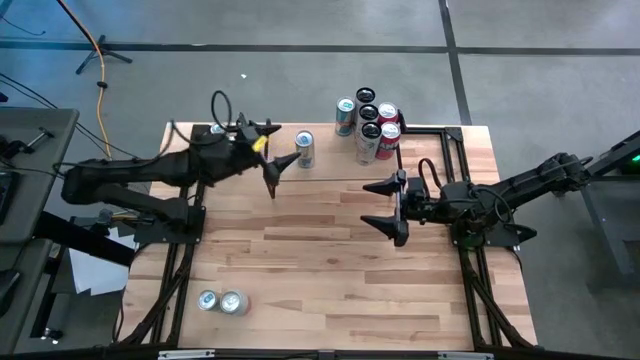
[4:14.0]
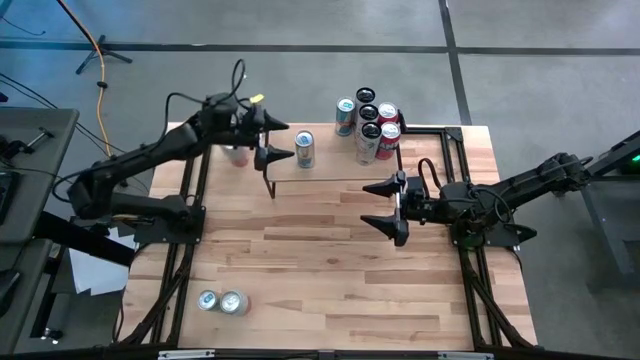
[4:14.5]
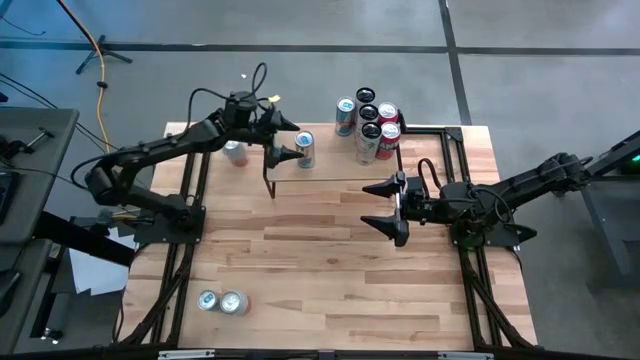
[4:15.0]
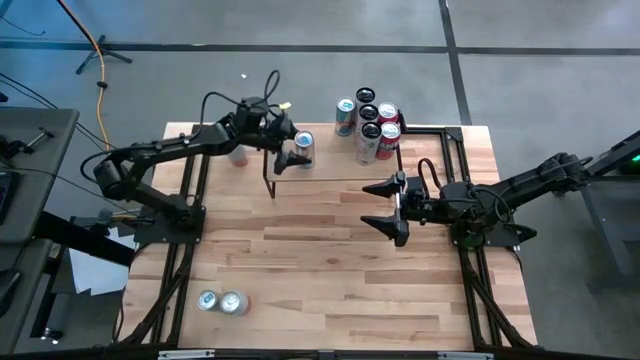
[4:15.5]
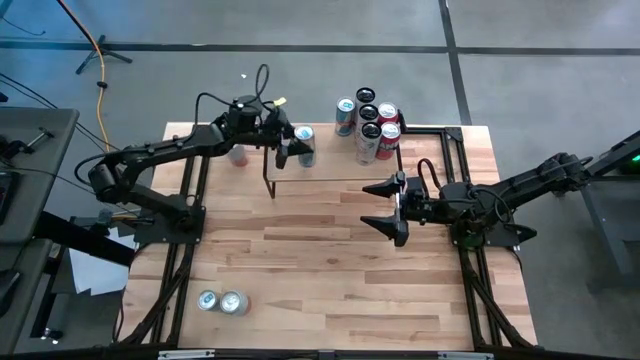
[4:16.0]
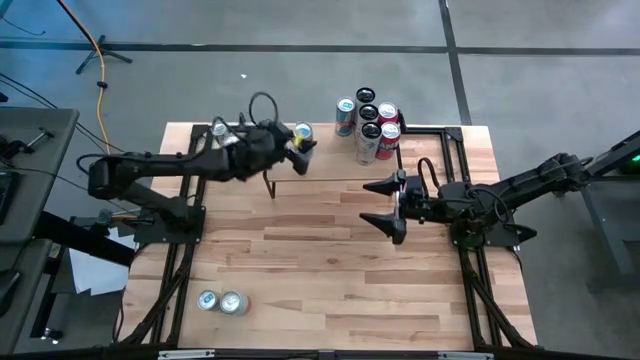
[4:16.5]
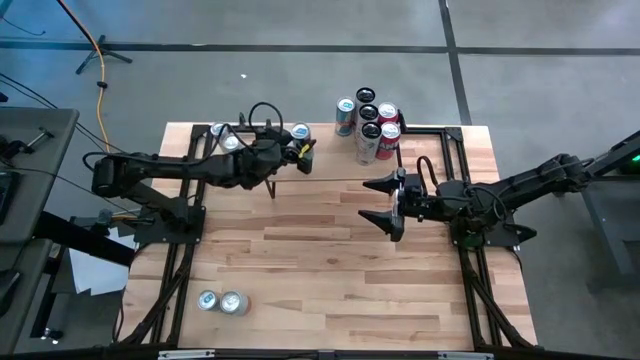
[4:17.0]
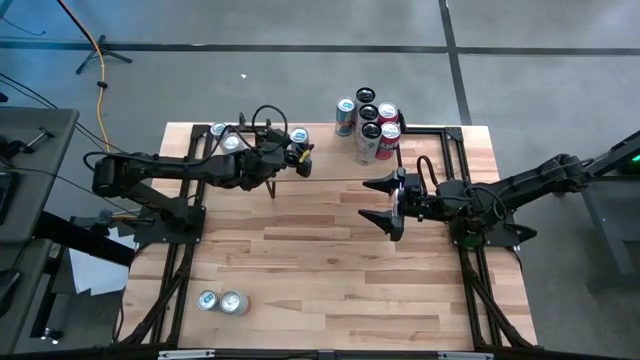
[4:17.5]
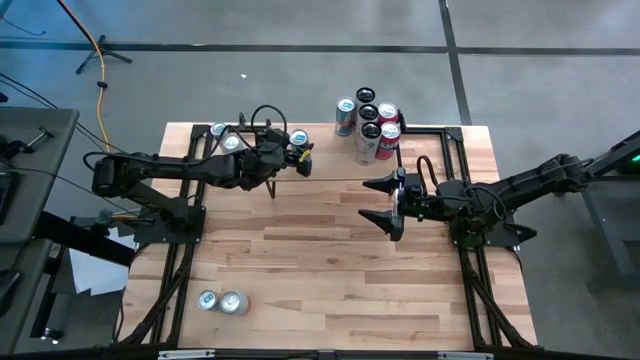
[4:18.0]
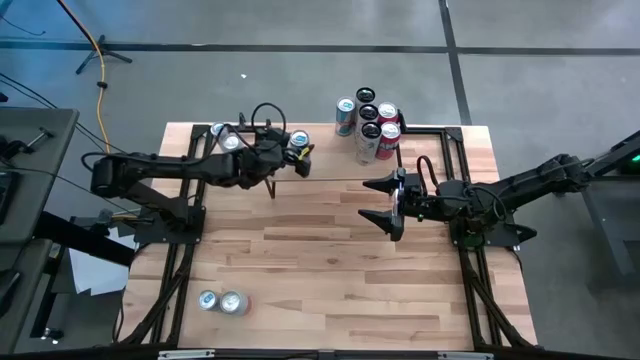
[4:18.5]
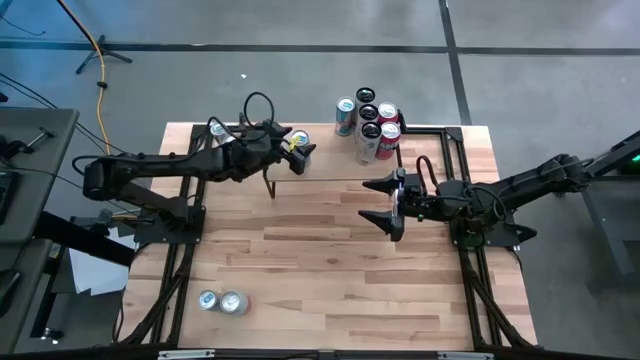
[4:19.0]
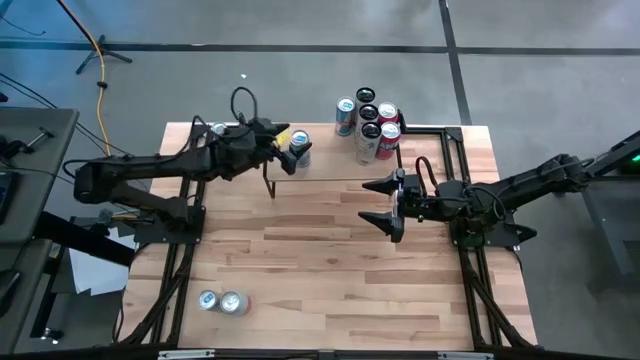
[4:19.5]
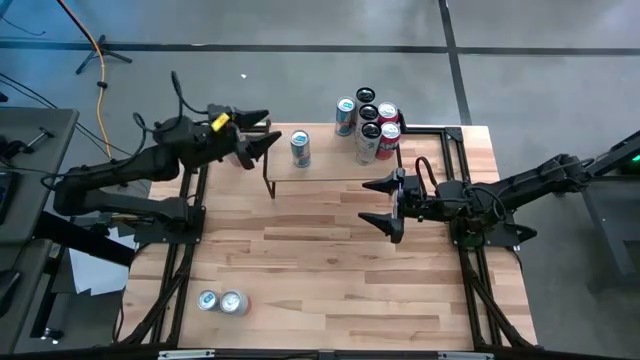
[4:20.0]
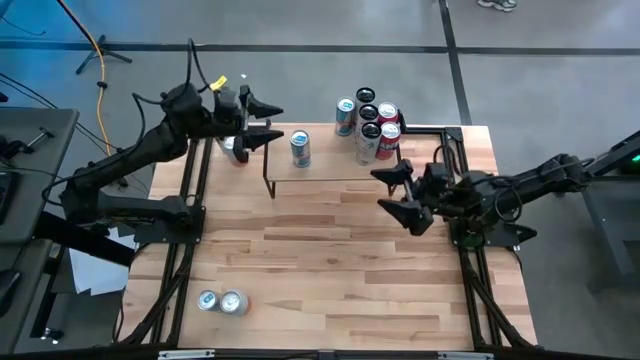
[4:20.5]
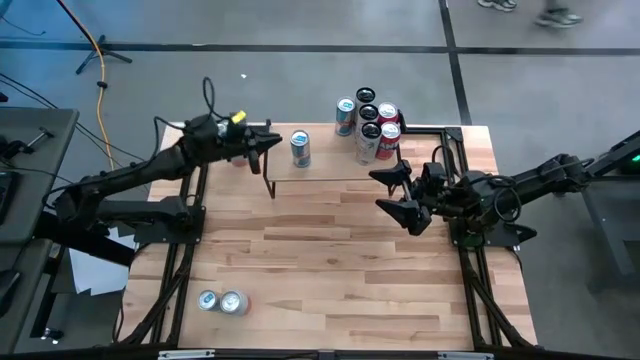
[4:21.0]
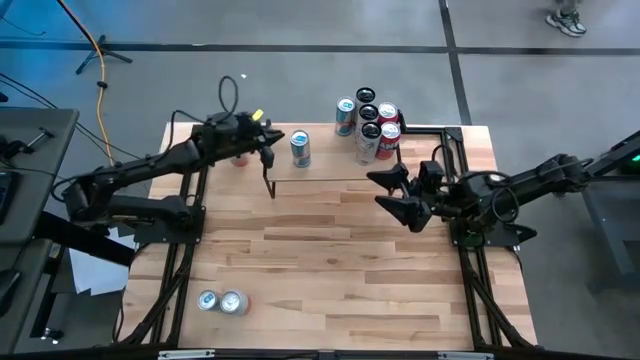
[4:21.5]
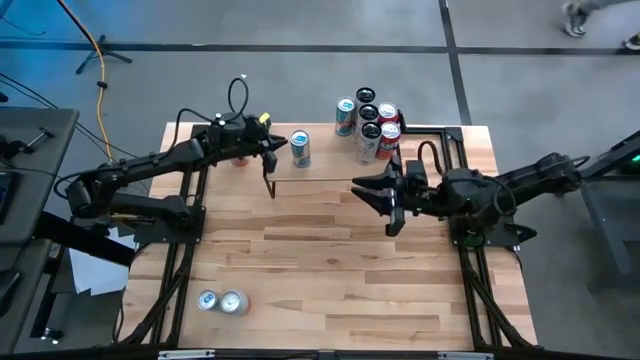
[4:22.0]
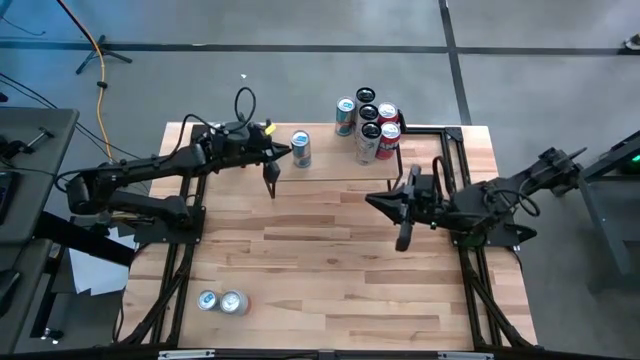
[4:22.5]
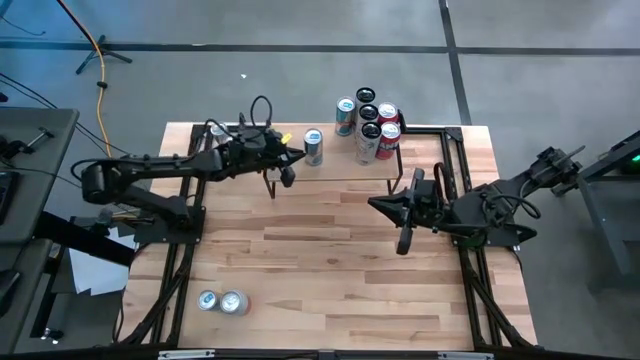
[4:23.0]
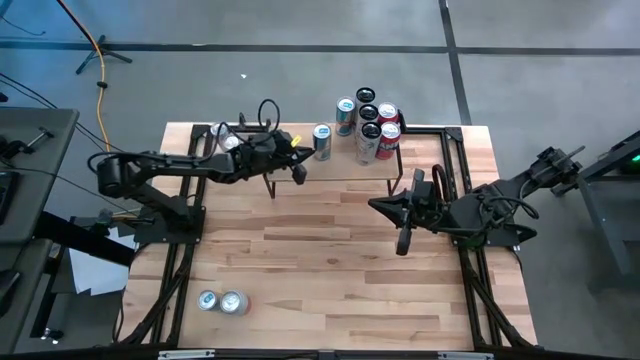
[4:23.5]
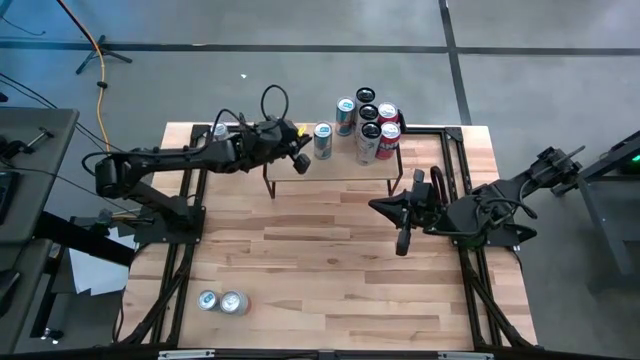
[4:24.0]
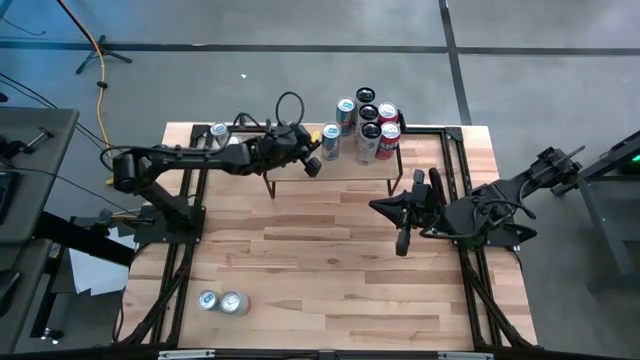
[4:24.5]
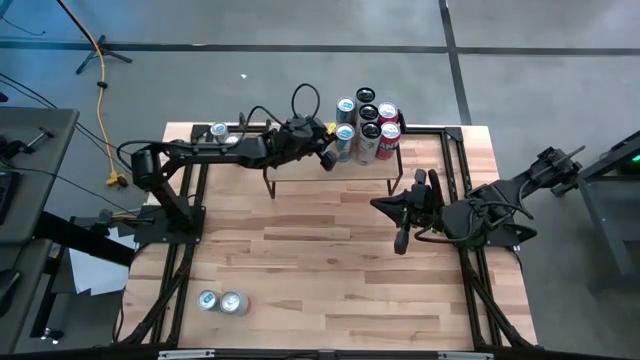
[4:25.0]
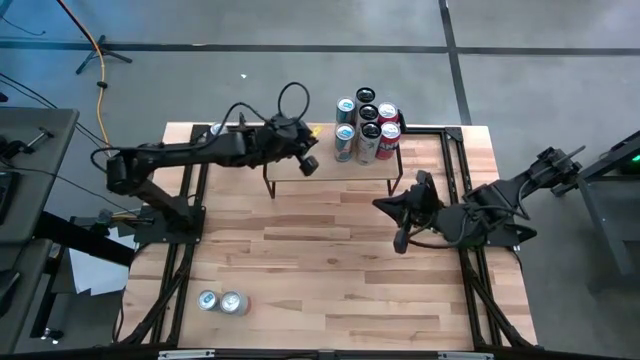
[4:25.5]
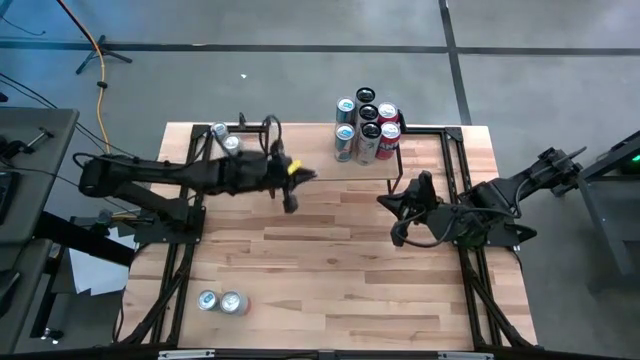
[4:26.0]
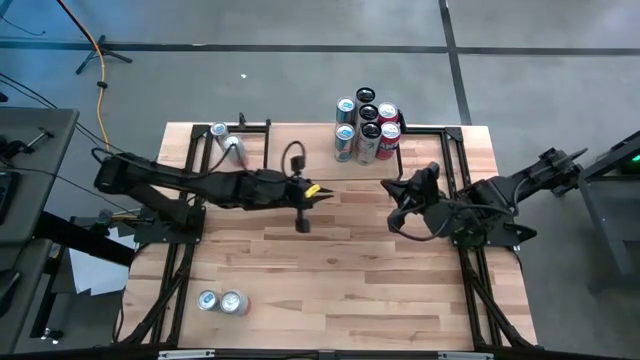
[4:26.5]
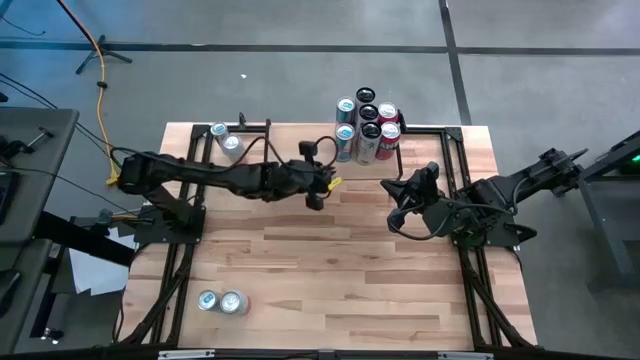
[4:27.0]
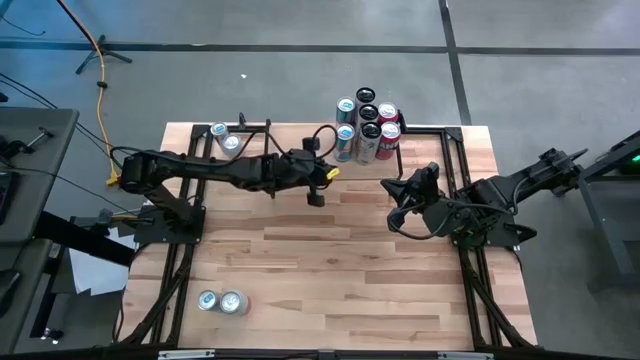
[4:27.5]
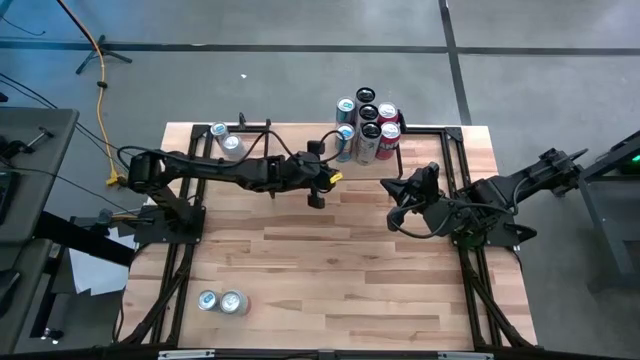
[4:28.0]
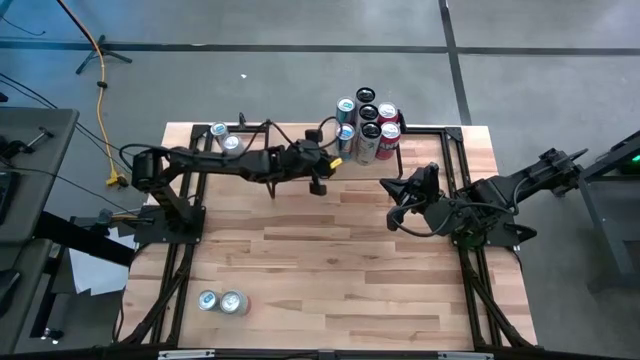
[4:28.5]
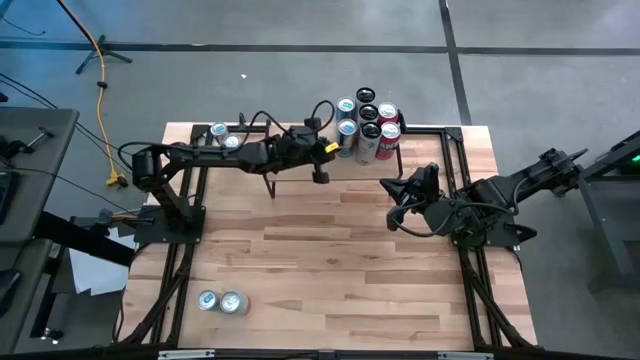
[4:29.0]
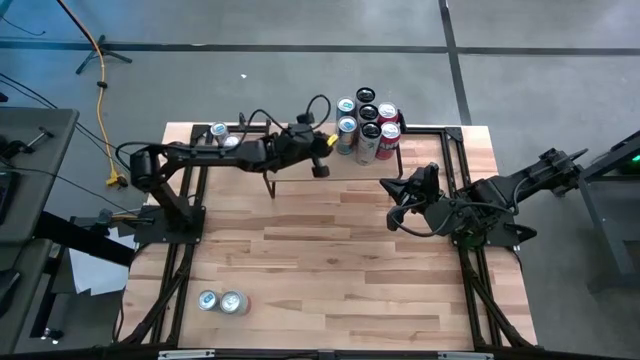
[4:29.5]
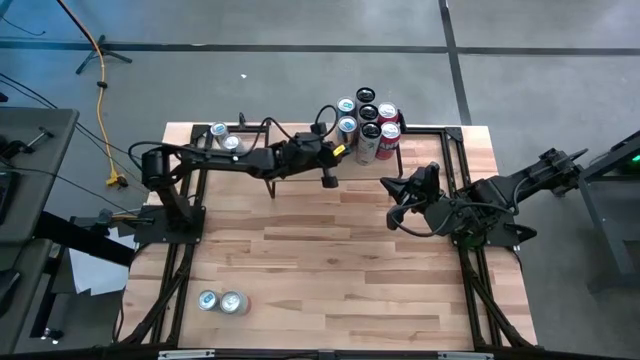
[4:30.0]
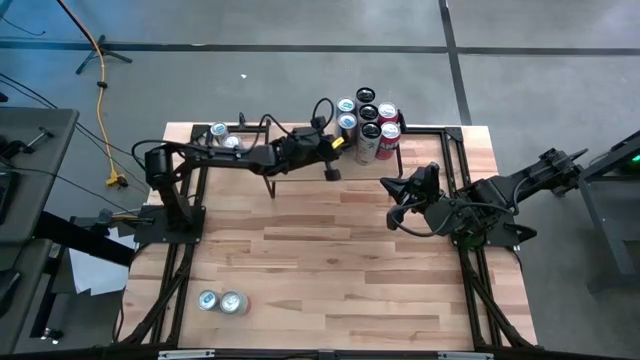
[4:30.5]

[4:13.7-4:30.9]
Task: Place canned beverage on shelf
Put the top right blue soda can on the shelf aligned with the blue soda can

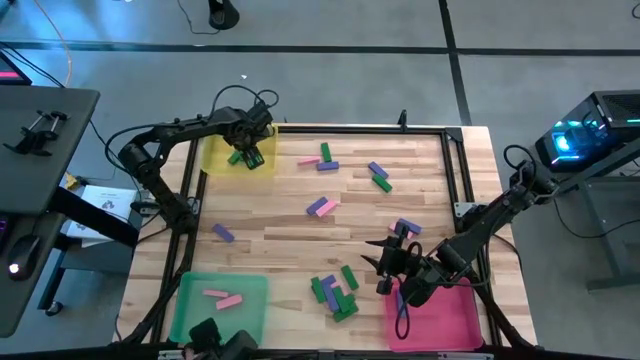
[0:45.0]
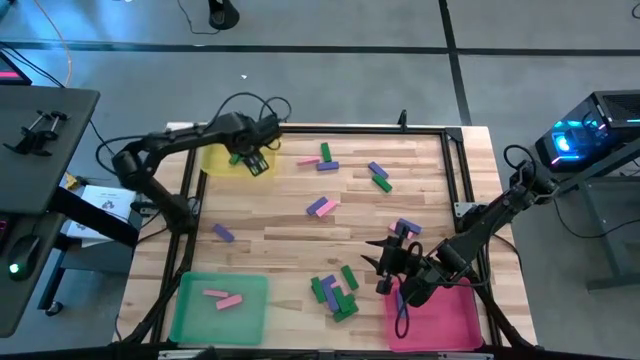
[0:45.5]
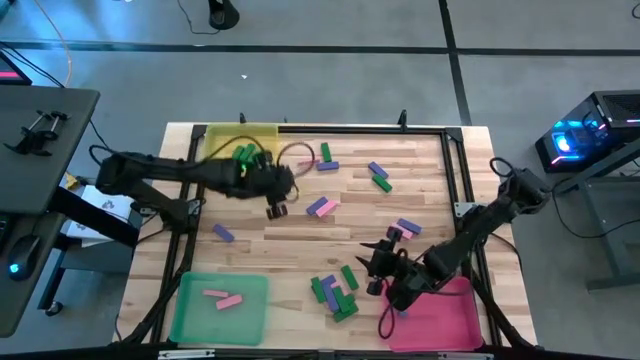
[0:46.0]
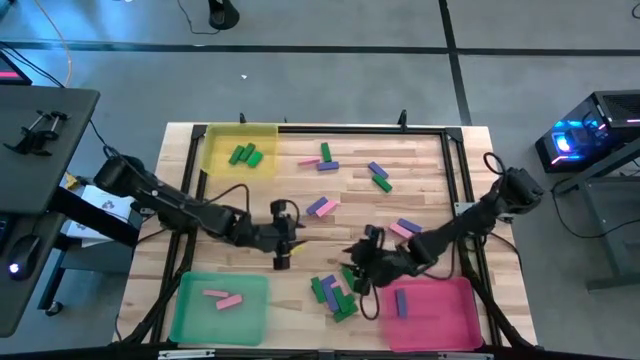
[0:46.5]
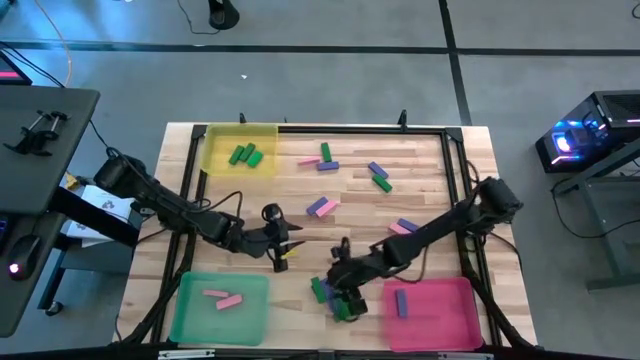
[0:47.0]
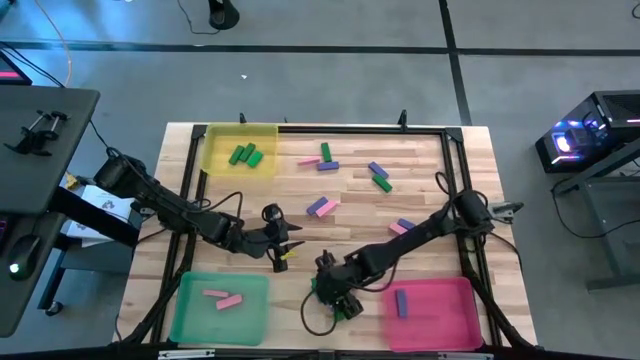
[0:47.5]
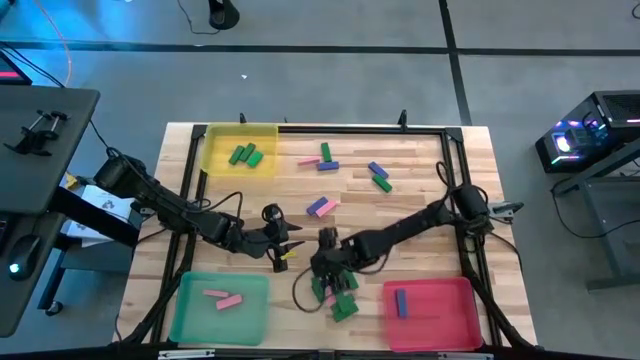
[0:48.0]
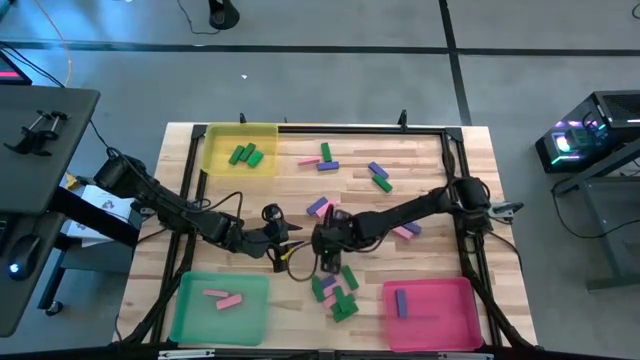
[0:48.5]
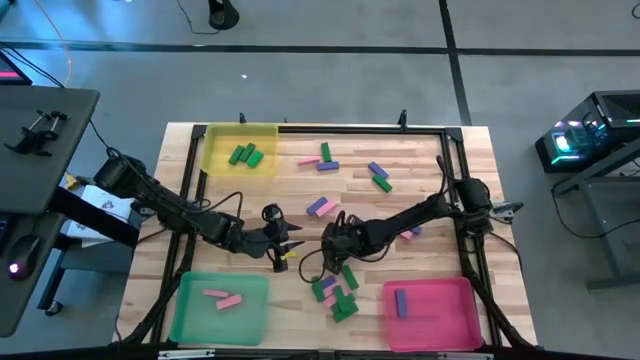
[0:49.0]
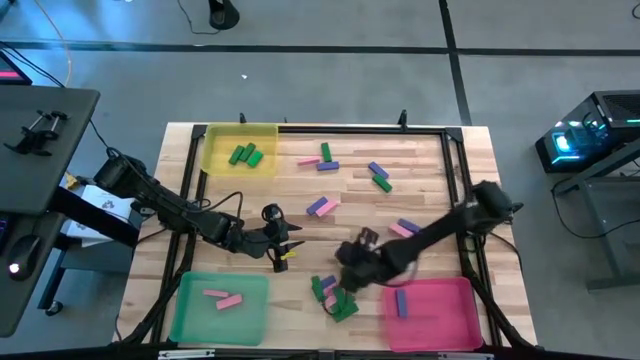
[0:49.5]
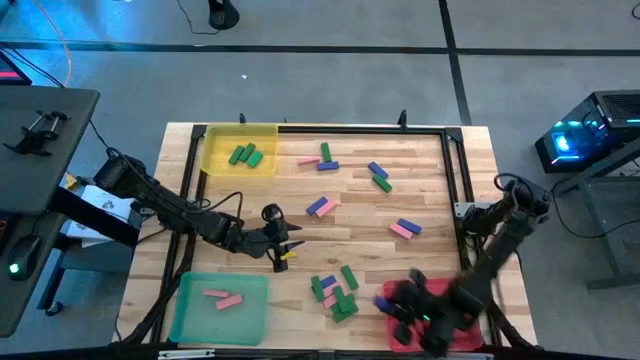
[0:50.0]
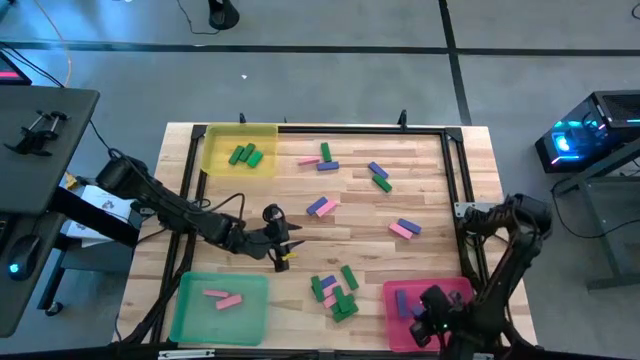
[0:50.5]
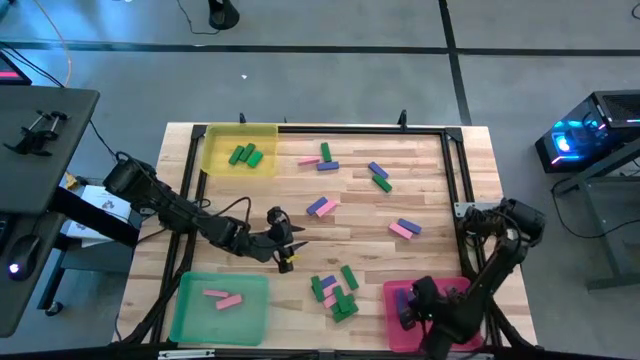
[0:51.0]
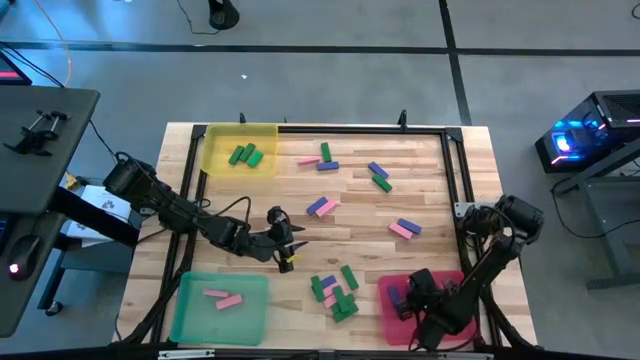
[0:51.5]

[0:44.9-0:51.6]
Task: Sort blocks
Put the violet block into the pink bin
